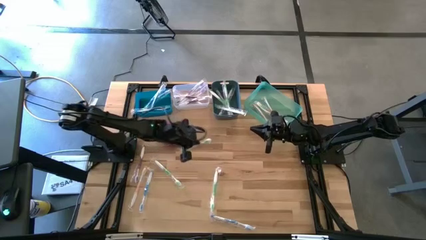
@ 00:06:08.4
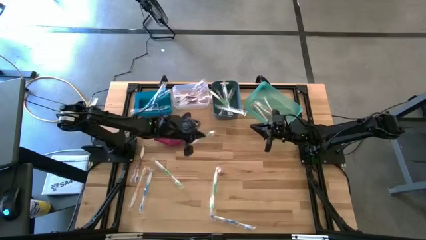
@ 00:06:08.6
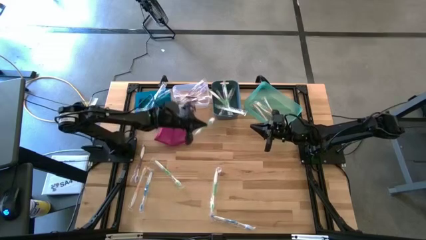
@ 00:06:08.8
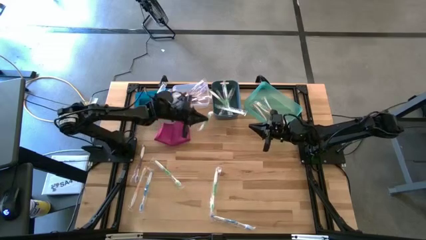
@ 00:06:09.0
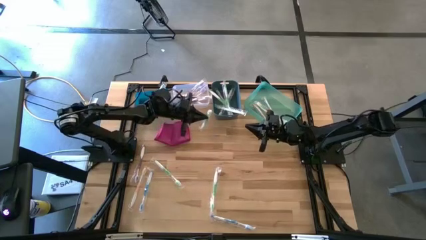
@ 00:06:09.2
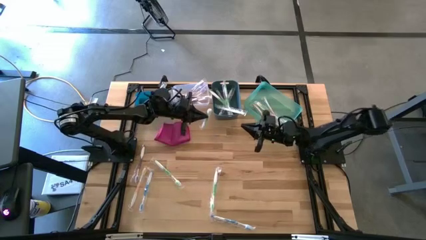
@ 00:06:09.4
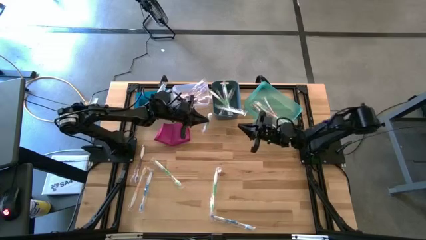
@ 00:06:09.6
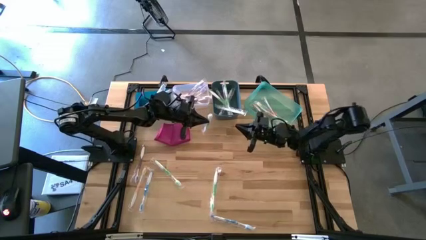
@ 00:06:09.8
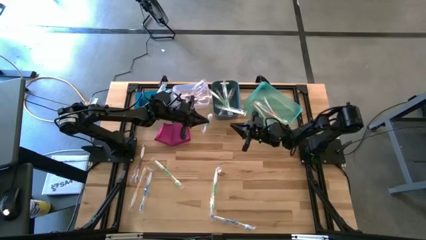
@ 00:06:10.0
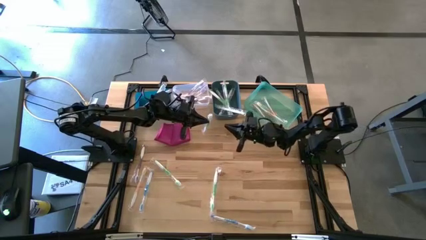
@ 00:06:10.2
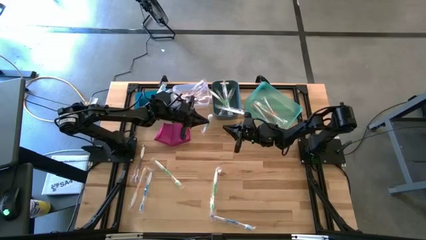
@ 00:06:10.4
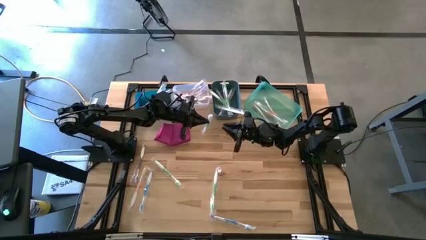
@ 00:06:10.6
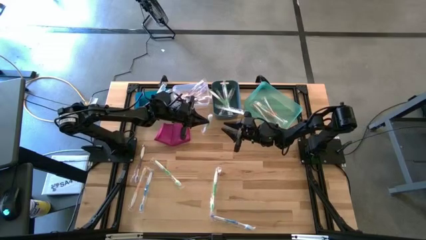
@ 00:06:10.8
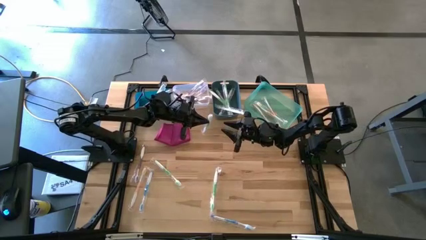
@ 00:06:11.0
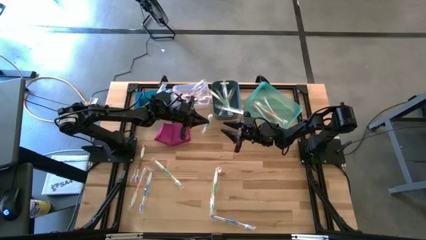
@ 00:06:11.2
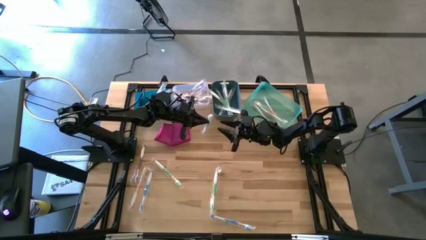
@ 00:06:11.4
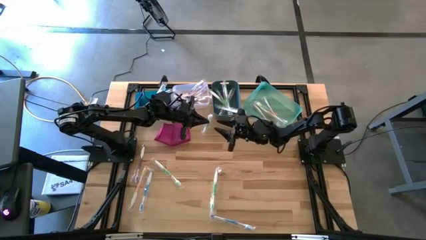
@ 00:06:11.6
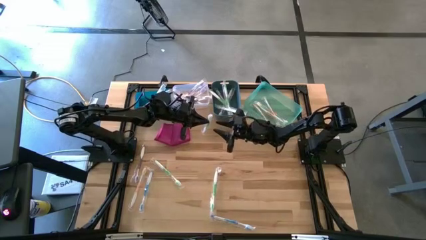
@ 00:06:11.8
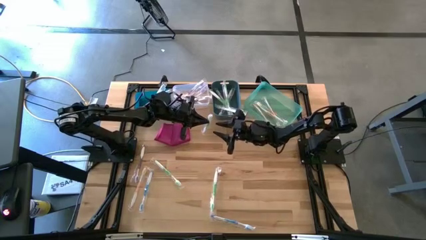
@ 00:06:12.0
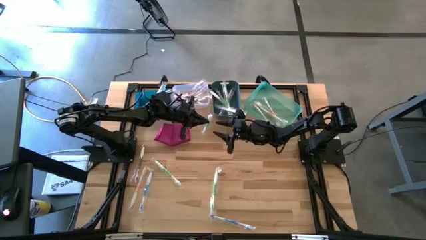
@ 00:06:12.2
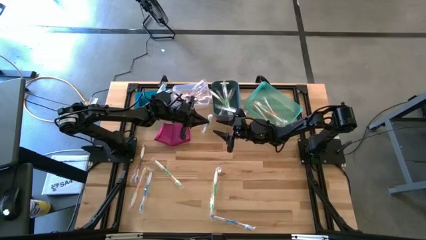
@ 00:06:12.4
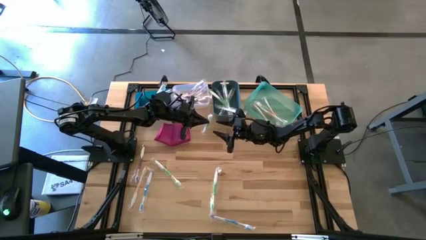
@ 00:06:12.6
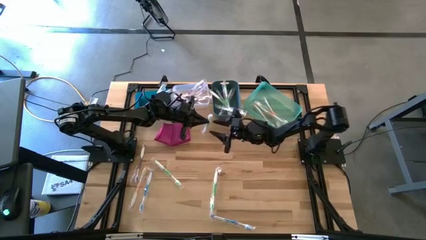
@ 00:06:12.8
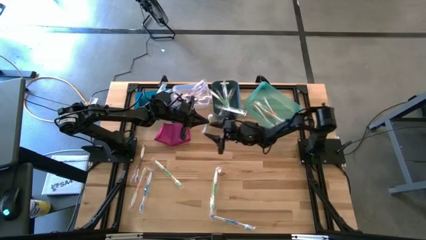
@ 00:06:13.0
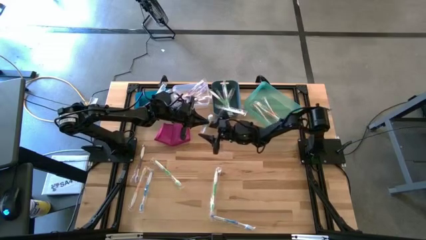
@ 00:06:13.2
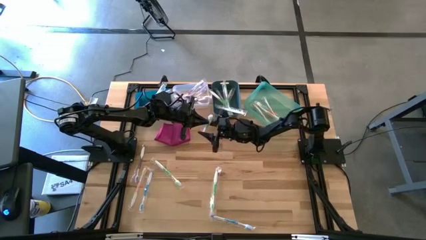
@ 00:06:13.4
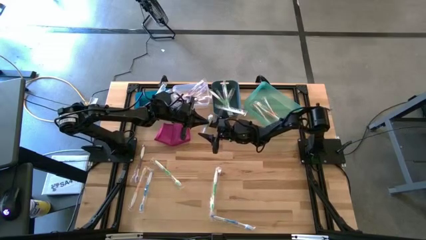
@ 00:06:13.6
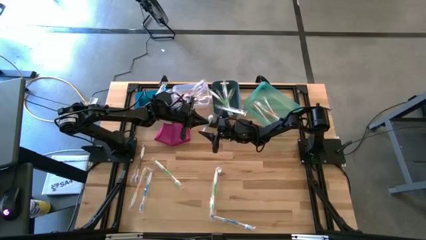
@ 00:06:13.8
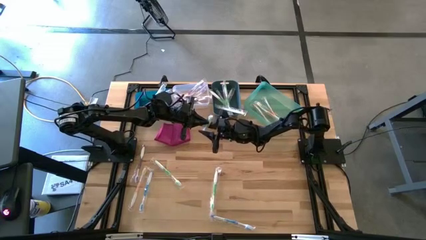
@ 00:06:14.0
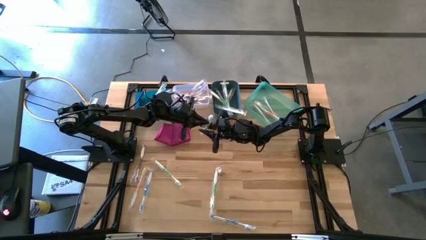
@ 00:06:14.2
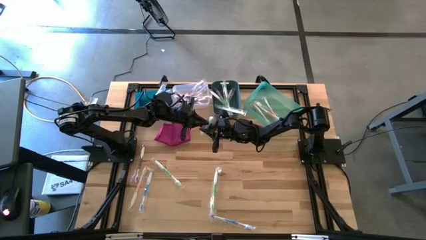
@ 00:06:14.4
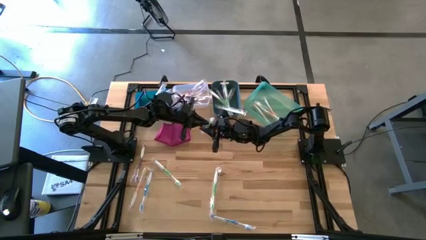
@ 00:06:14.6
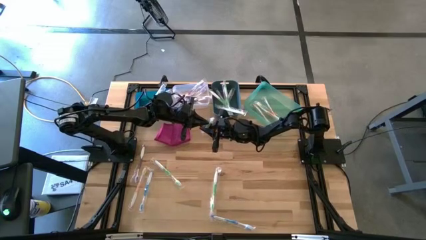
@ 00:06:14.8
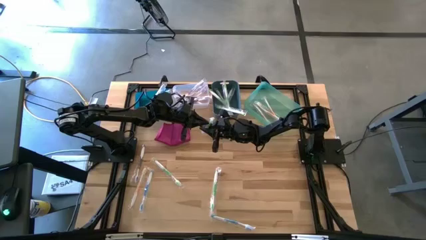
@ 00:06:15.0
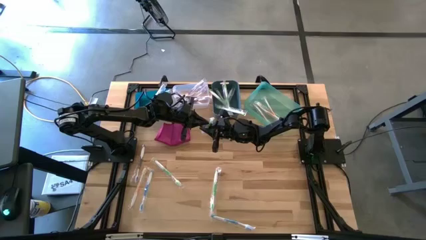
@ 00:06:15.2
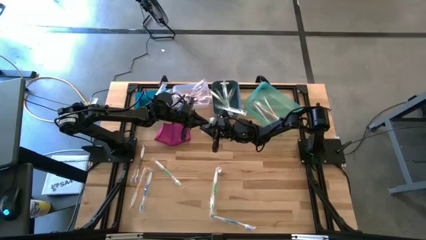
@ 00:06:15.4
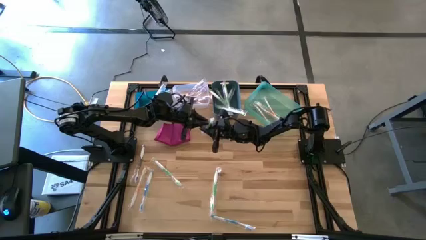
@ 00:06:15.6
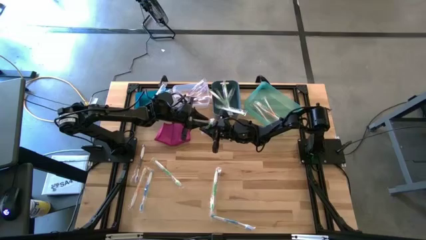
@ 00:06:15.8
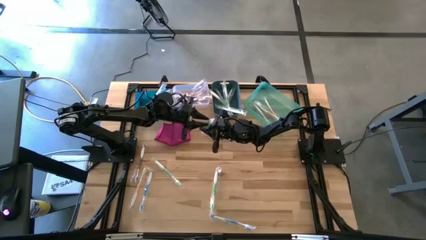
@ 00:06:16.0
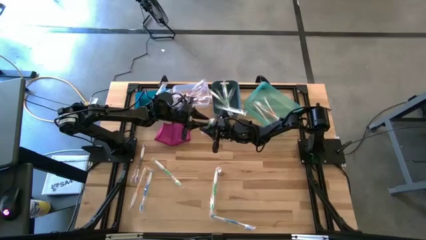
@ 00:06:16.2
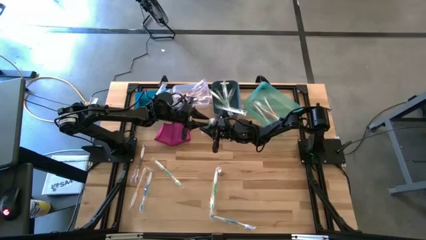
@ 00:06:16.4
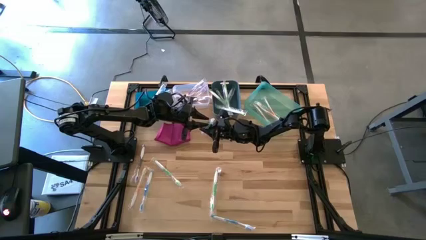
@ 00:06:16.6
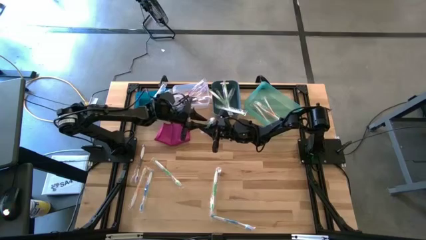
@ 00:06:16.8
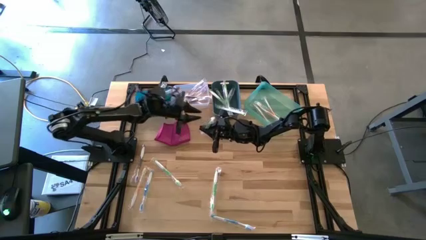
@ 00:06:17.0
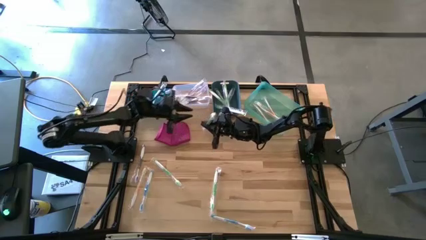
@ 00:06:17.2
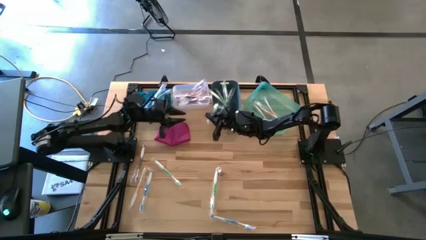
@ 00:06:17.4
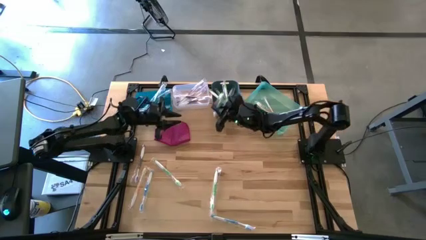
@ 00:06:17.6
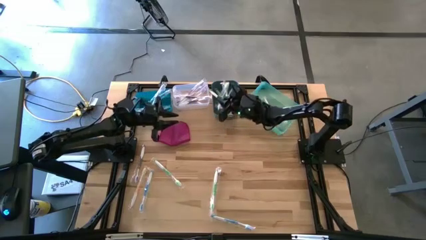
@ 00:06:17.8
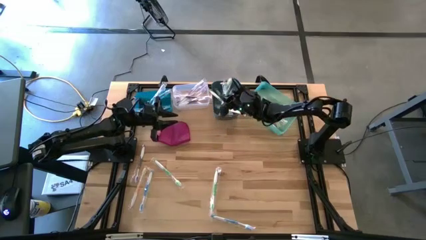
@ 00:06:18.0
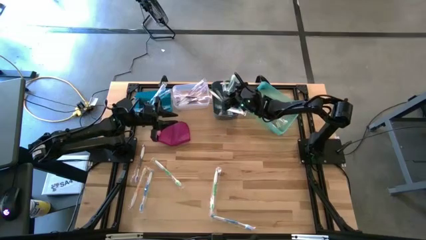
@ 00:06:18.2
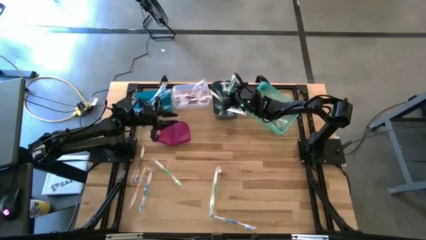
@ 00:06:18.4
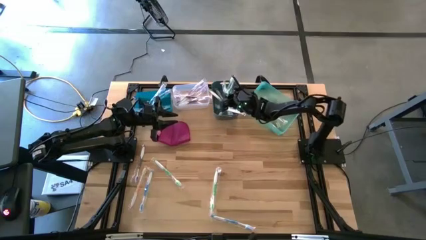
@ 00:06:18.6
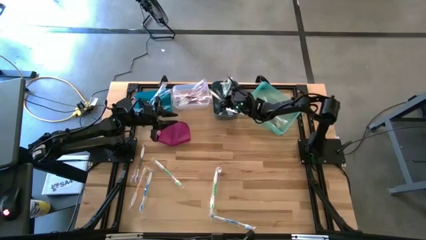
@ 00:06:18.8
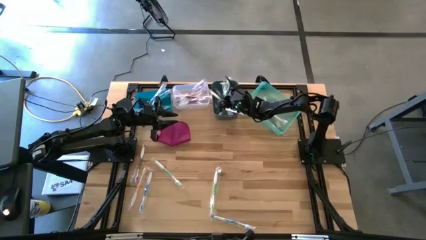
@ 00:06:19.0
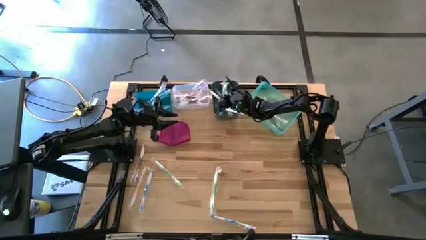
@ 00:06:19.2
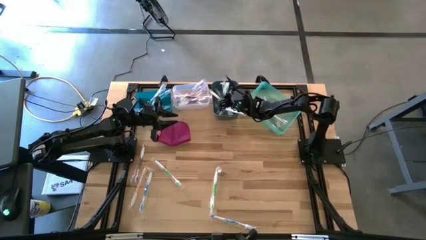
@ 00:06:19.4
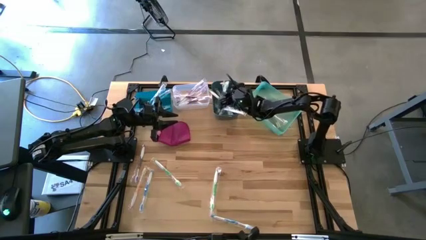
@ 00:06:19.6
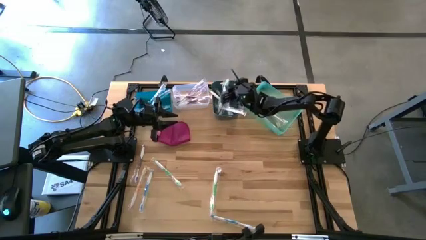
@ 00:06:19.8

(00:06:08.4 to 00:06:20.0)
Task: Pick & Place Toothbrushes
Put the green toothbrush into the dark blue bin

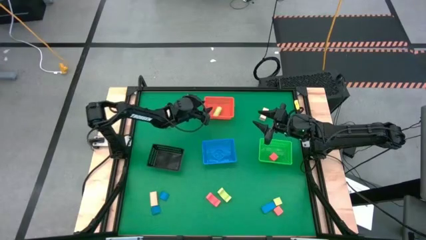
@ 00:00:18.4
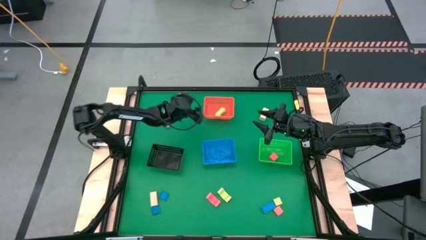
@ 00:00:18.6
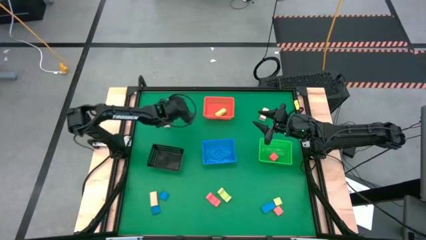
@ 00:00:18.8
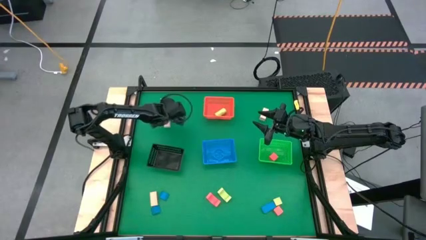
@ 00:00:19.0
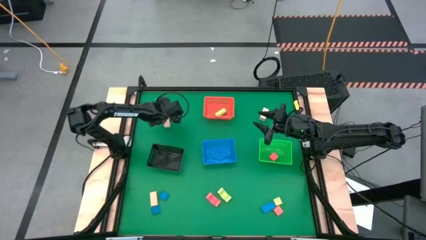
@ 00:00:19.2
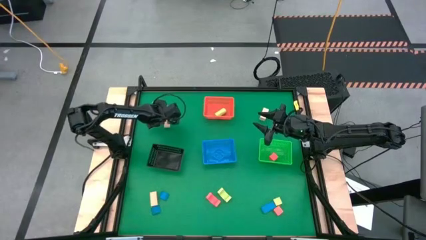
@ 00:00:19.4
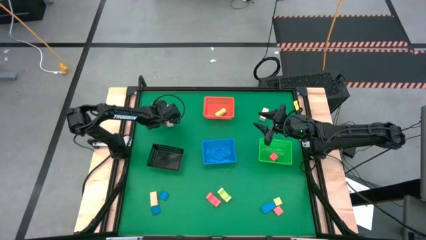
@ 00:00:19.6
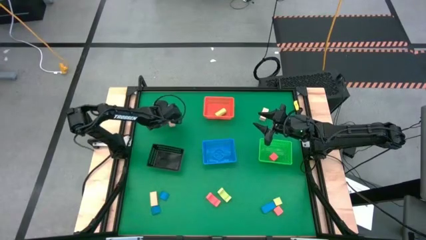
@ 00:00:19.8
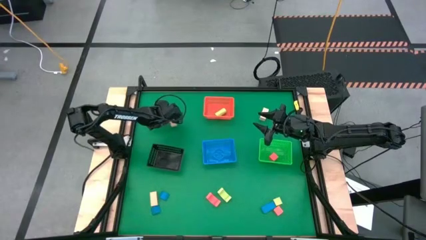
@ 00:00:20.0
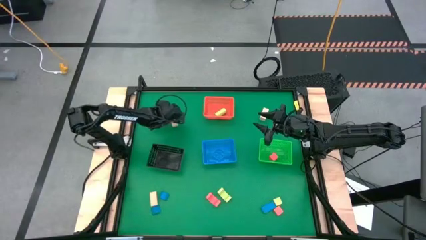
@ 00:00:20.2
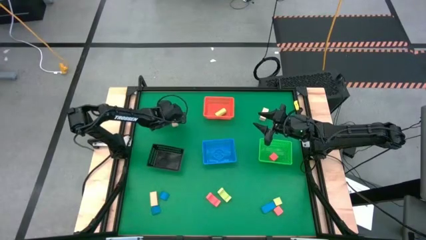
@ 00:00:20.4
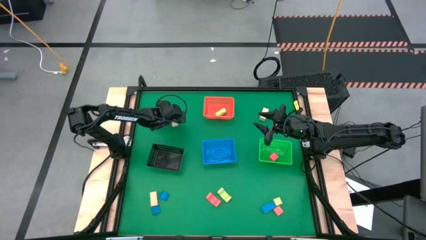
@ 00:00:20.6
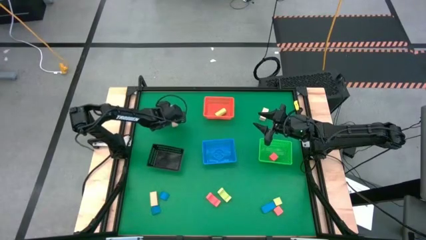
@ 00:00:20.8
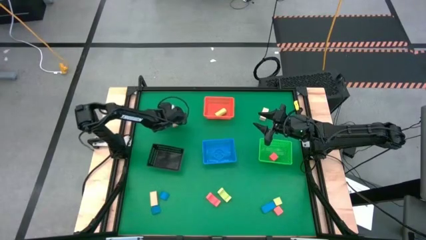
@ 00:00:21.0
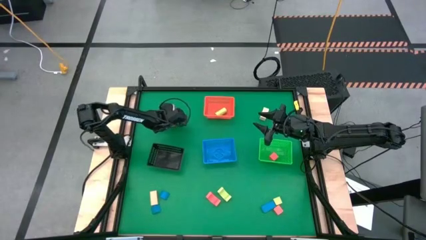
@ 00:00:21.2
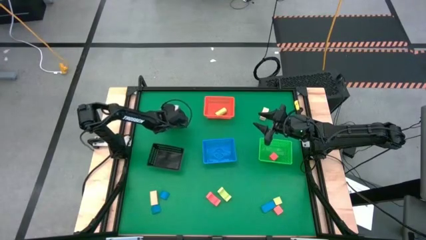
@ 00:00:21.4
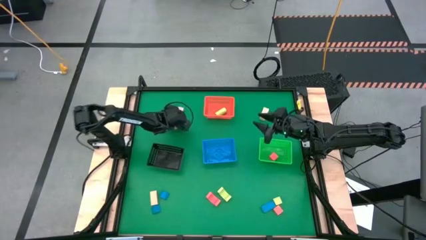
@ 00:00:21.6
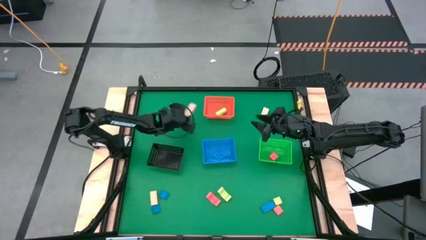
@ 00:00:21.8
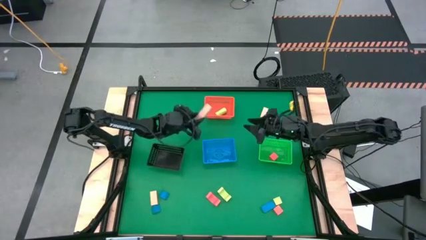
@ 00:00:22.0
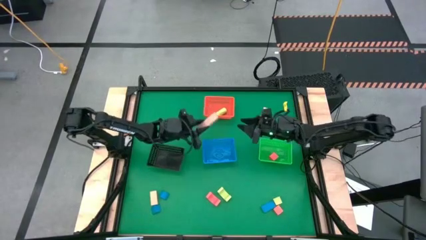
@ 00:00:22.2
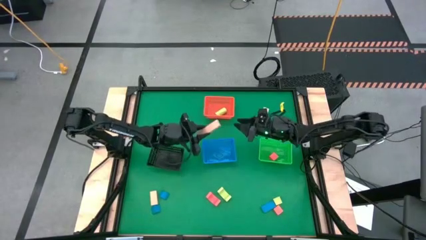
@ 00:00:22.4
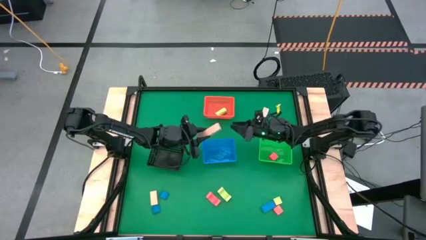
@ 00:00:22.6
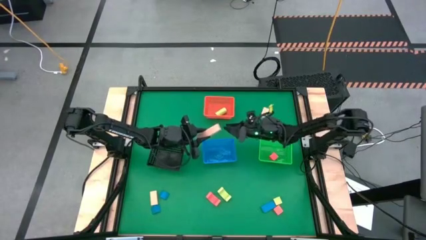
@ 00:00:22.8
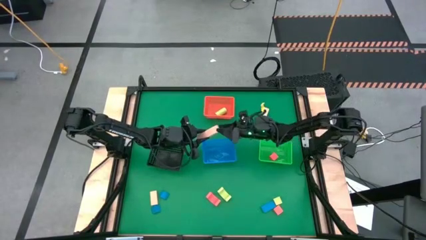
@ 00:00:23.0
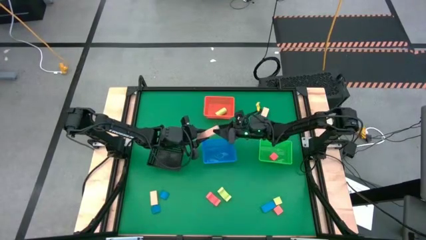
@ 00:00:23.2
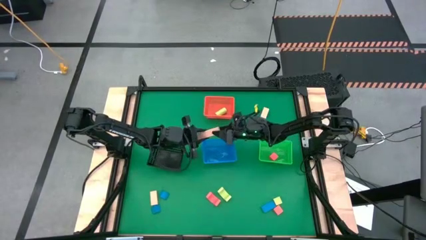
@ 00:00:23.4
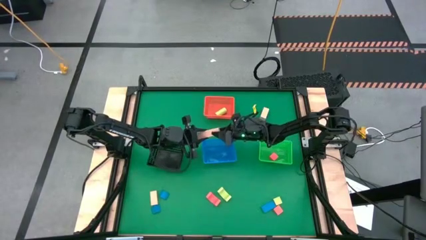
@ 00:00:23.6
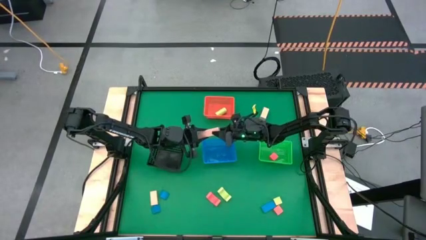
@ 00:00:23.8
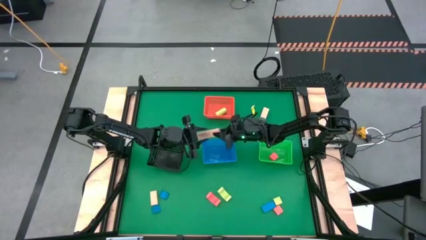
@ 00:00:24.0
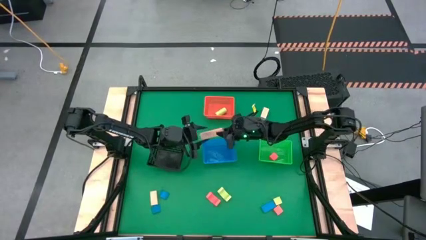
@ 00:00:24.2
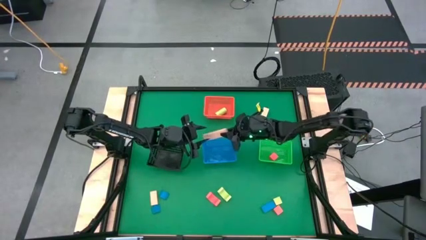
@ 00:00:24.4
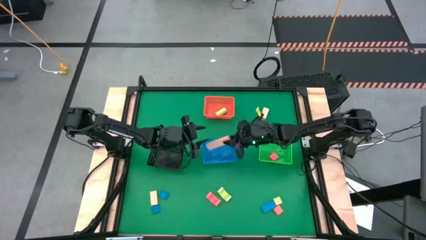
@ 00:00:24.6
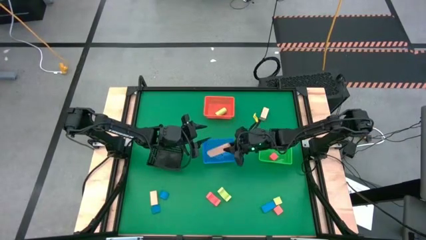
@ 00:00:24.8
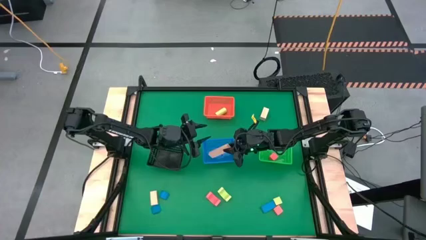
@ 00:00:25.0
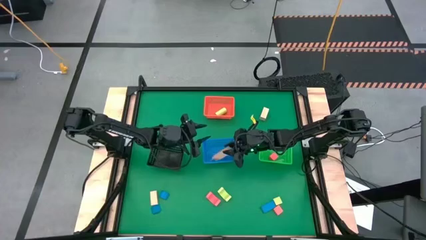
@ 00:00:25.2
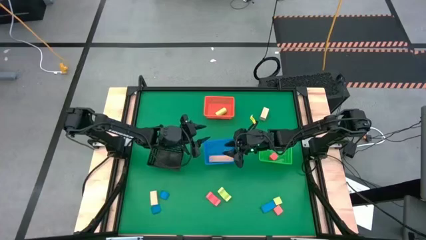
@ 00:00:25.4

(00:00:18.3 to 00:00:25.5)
Task: Sort & place blocks by color
Put the top left brown block into the blue bin
